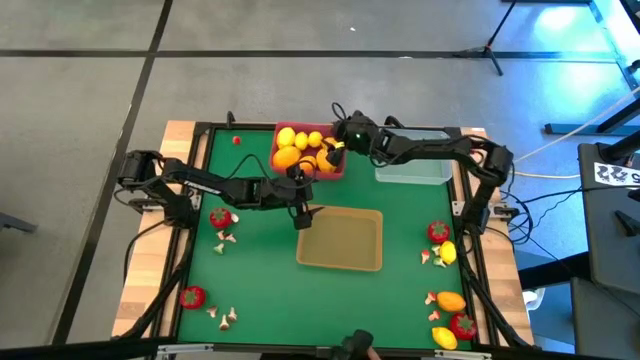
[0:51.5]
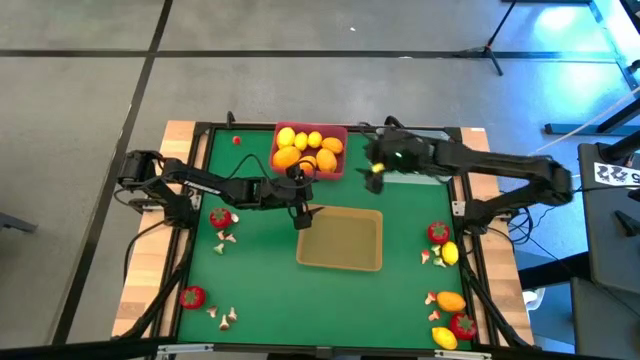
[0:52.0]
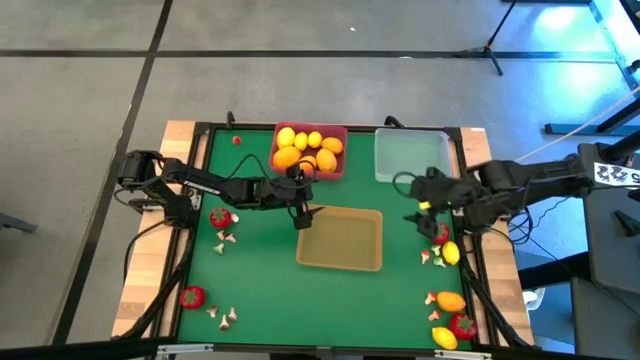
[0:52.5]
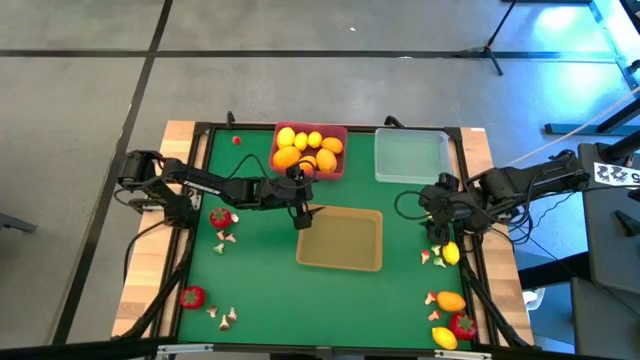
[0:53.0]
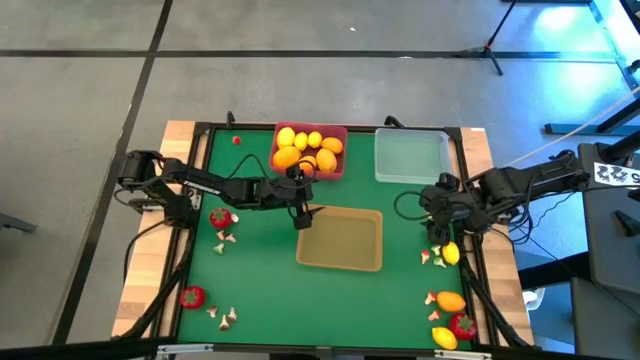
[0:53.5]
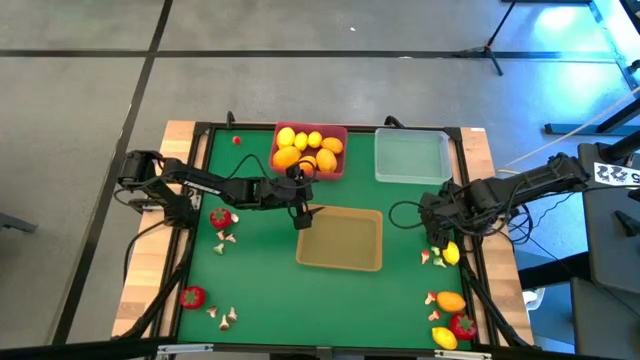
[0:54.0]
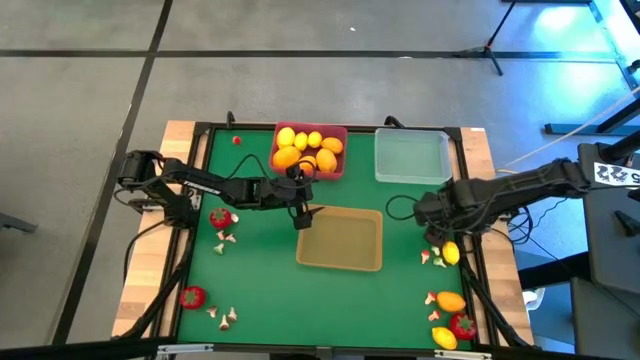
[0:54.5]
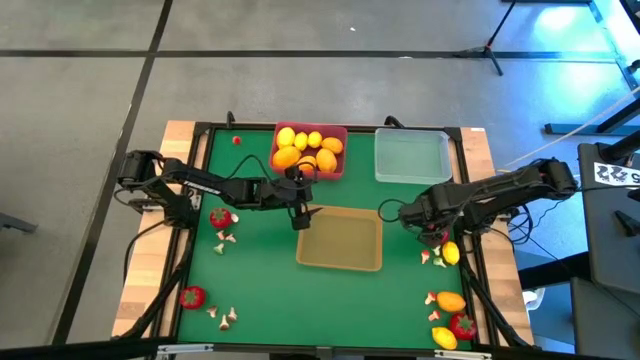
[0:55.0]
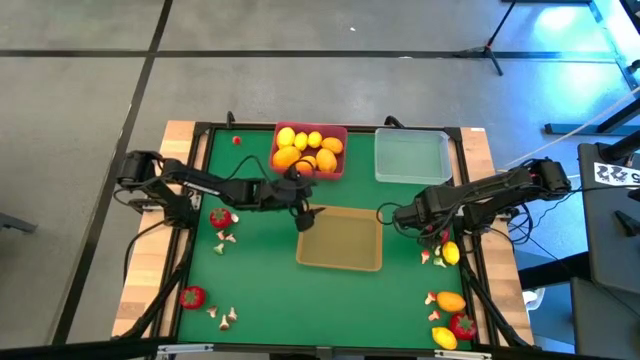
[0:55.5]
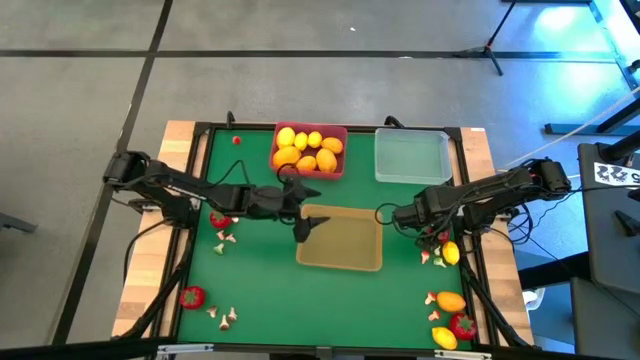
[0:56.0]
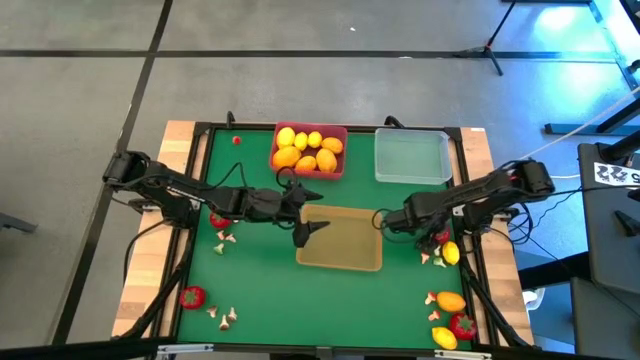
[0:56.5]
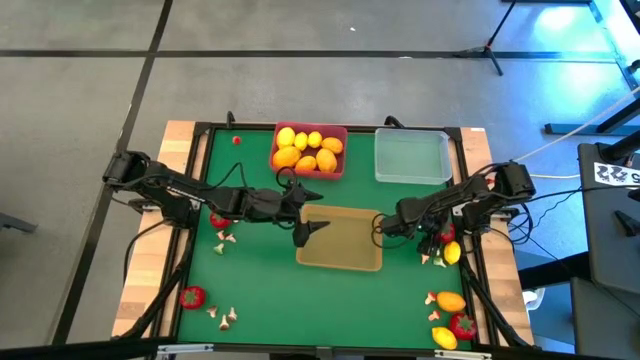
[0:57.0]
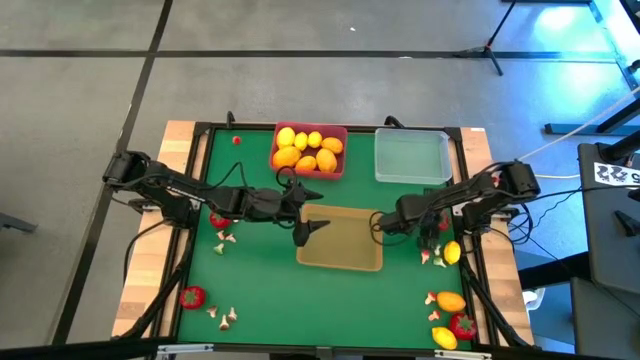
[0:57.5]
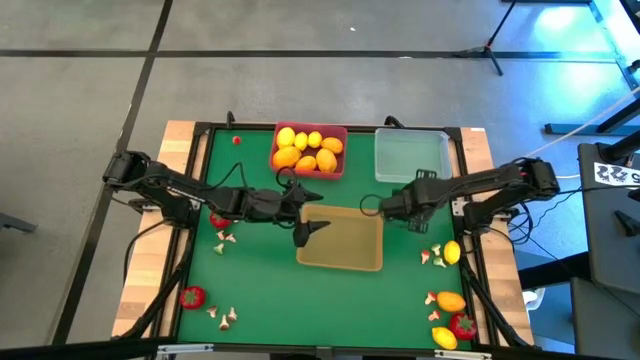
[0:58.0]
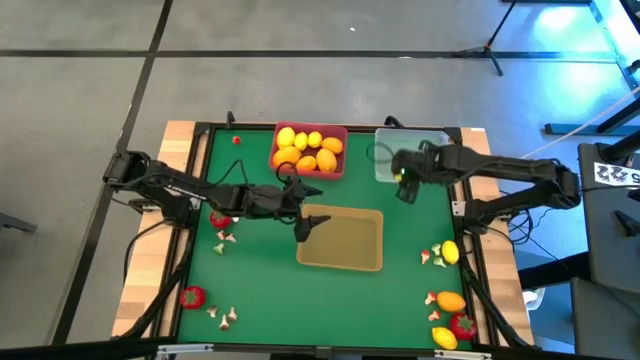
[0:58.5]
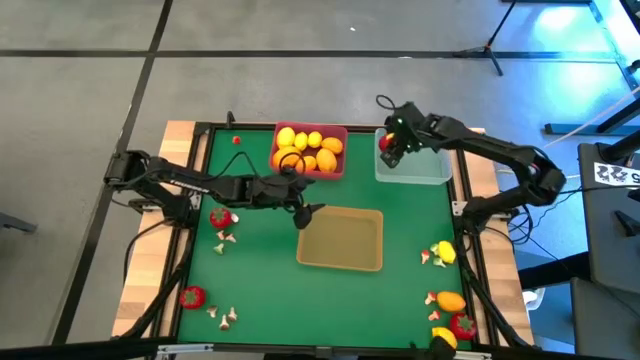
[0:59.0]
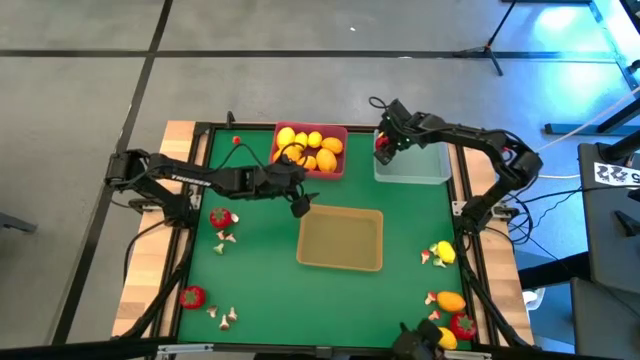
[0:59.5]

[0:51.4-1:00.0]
Task: Sort produce into baskets
Put the red tomato into the white bin

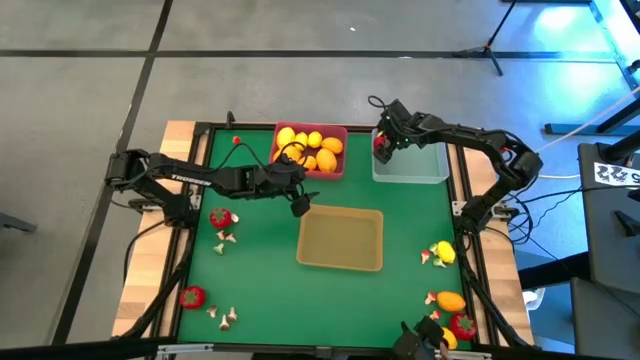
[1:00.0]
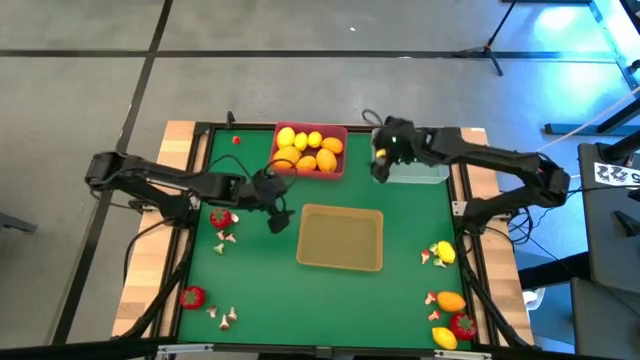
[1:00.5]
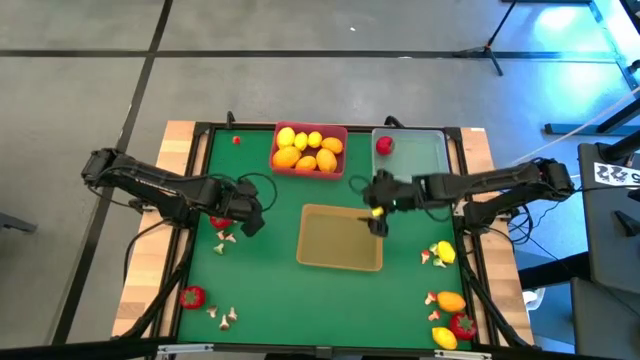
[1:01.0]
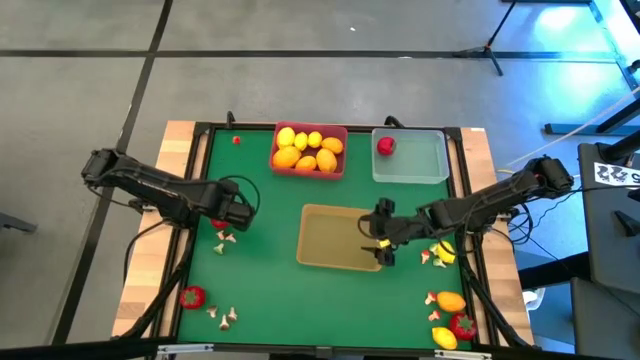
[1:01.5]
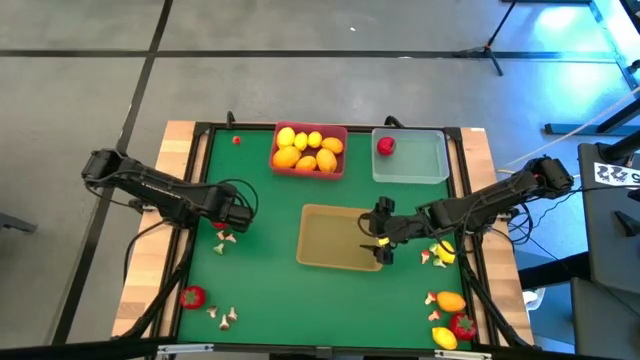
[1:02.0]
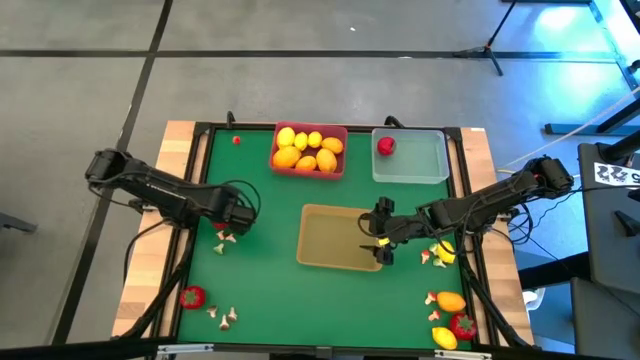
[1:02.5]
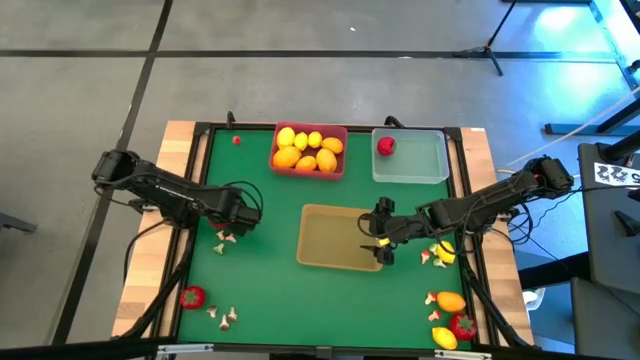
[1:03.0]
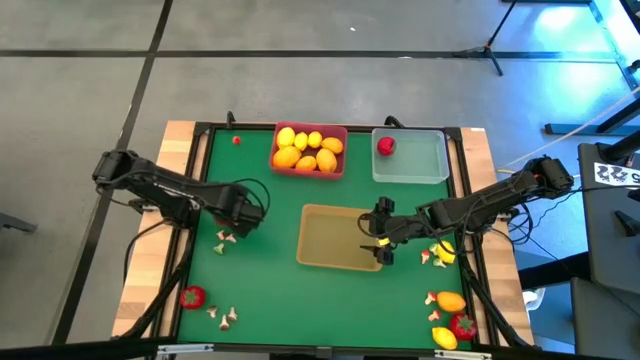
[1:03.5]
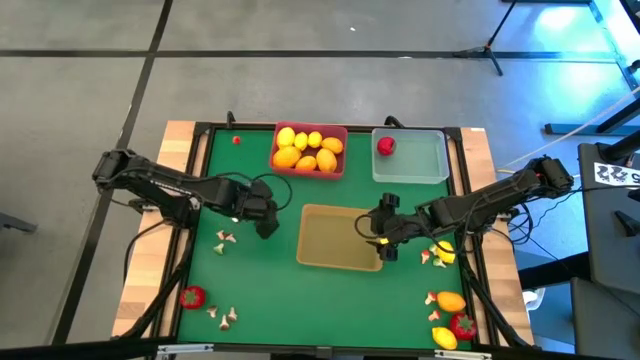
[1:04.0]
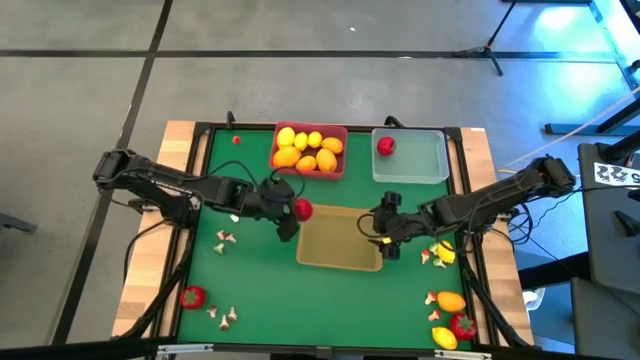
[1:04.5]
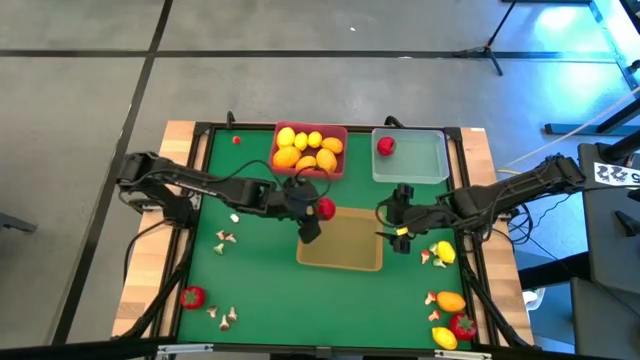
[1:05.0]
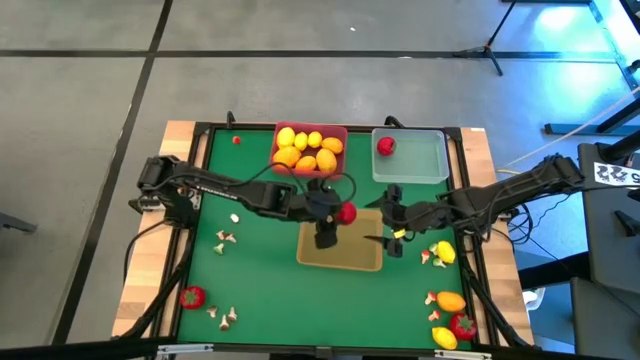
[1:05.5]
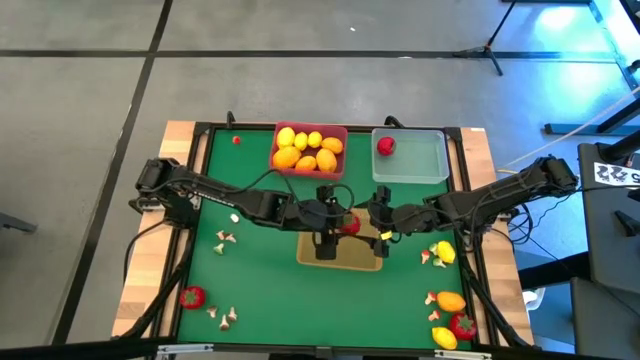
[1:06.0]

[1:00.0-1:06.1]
Put the red tomato into the white bin

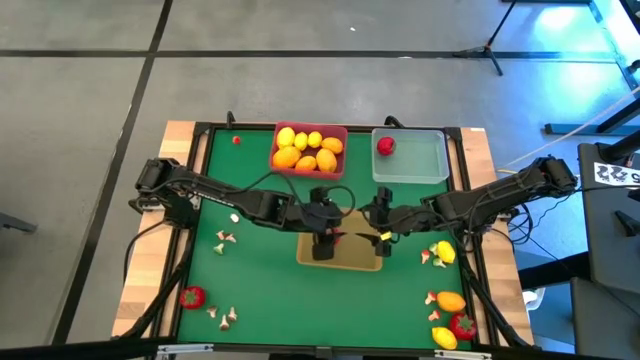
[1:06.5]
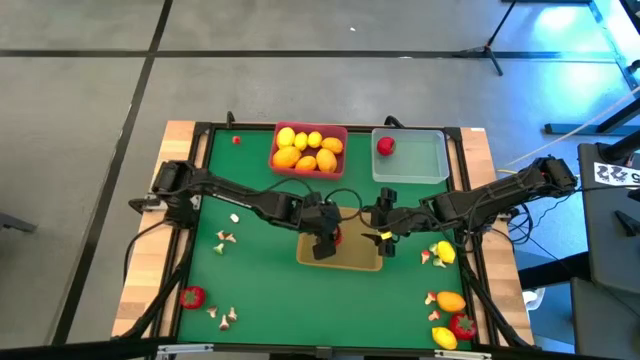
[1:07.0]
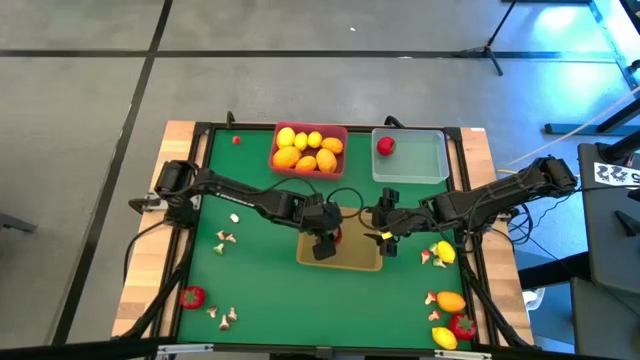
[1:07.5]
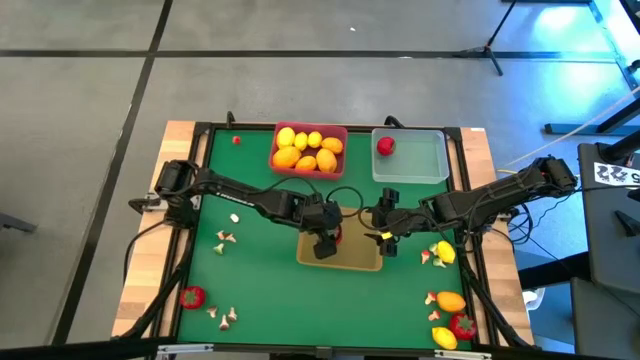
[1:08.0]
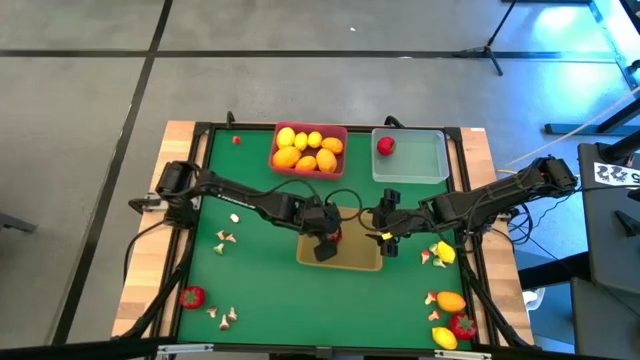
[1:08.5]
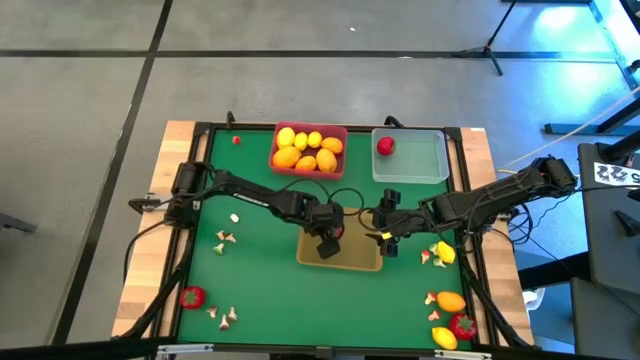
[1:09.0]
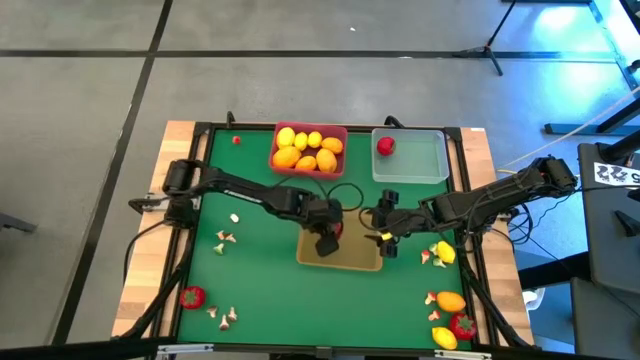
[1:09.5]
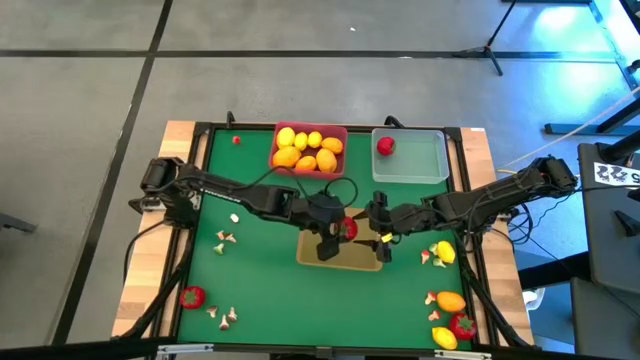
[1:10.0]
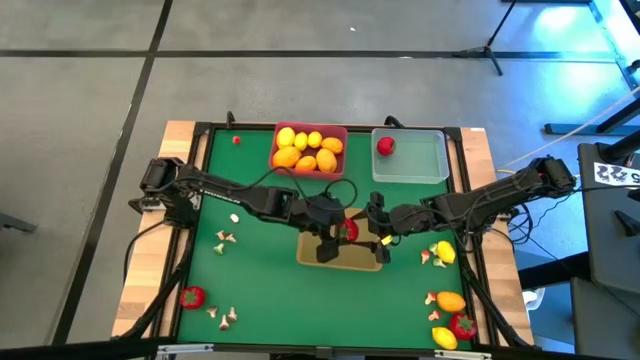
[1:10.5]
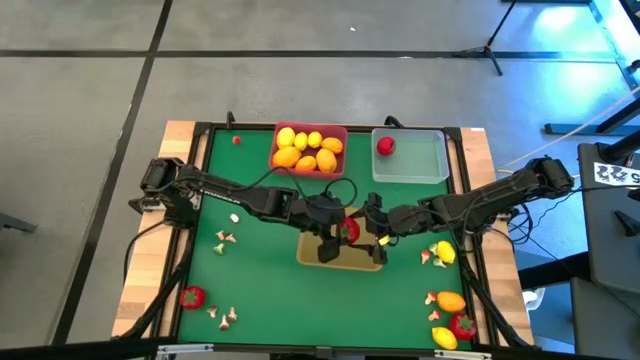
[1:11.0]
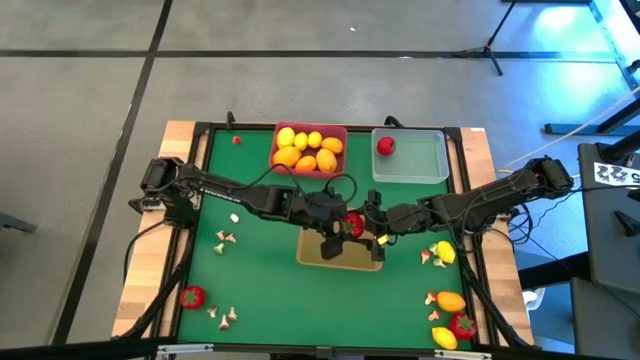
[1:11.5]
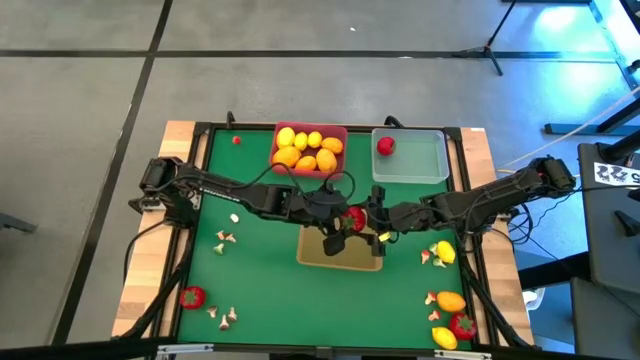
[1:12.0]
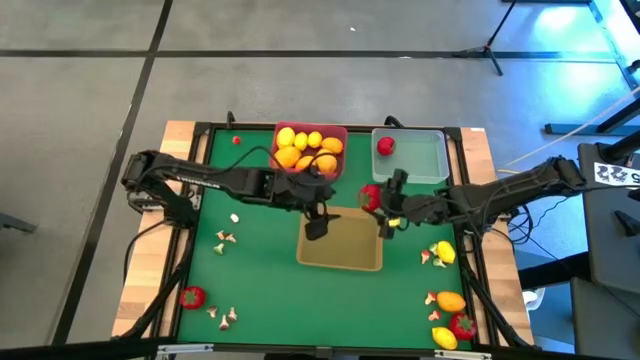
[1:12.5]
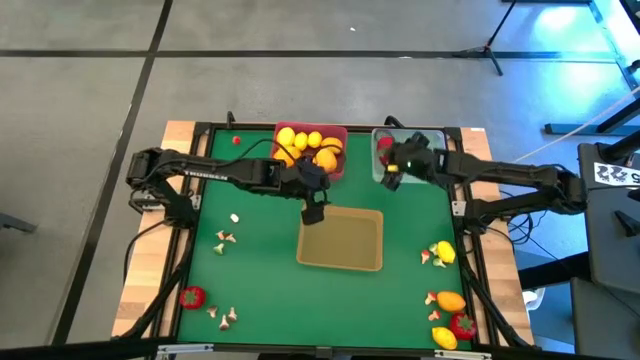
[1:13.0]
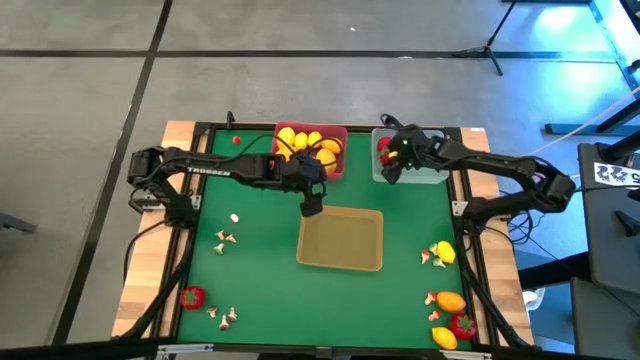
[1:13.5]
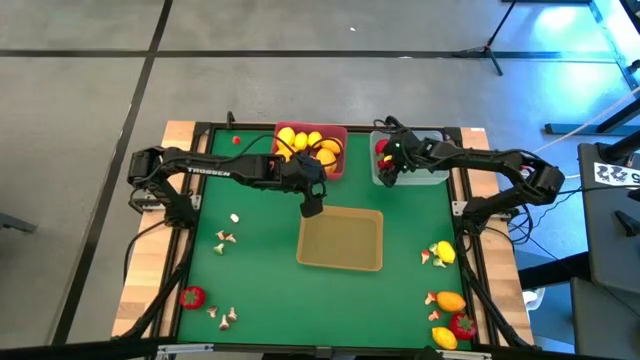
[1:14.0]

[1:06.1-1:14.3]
Put the red tomato into the white bin
